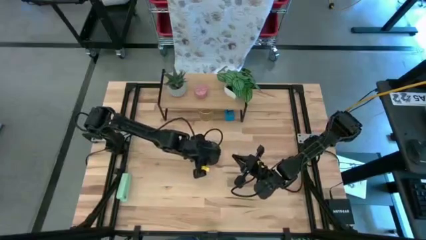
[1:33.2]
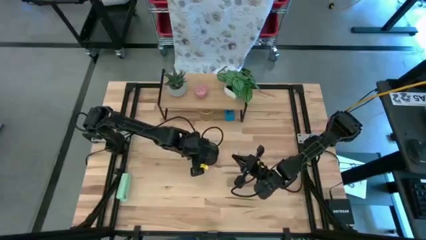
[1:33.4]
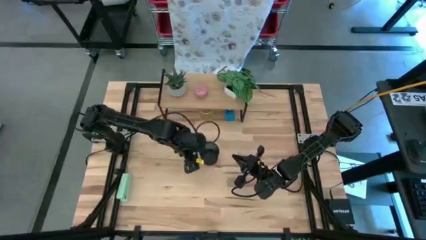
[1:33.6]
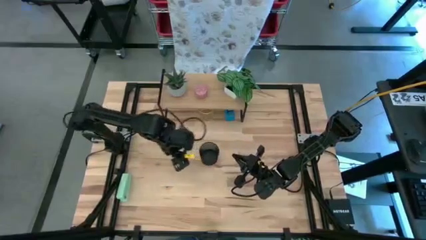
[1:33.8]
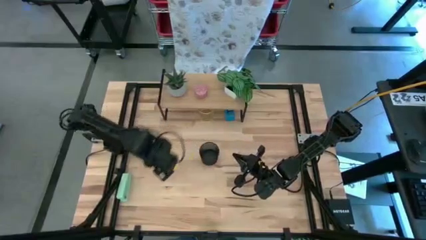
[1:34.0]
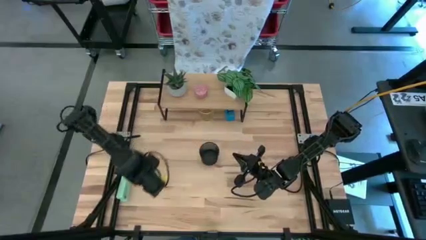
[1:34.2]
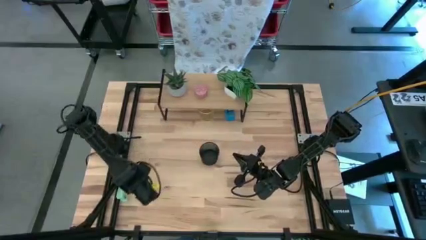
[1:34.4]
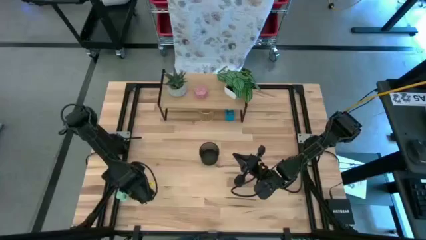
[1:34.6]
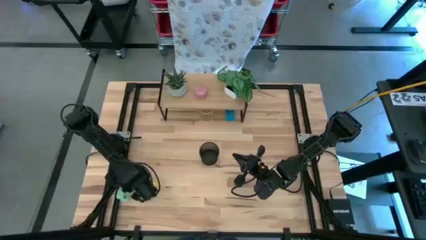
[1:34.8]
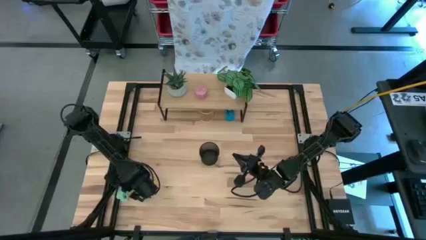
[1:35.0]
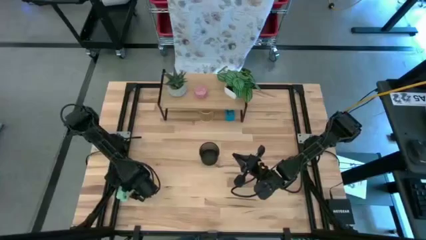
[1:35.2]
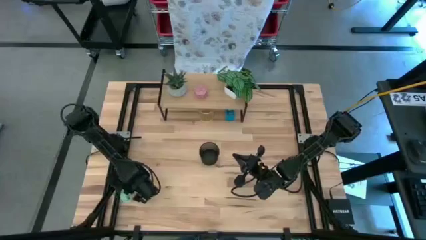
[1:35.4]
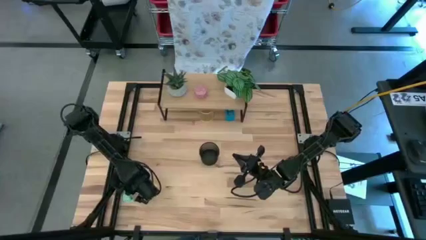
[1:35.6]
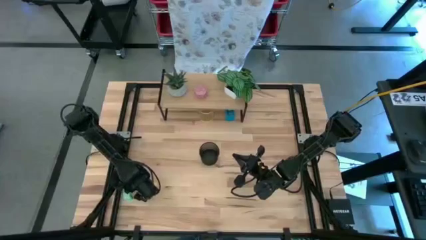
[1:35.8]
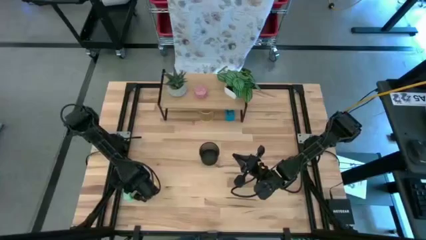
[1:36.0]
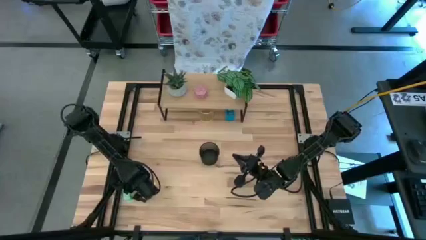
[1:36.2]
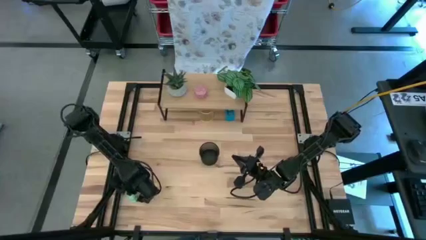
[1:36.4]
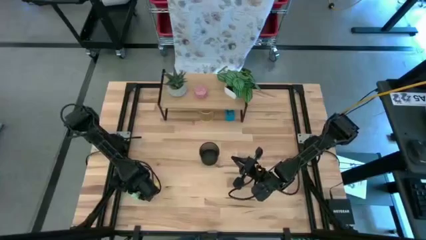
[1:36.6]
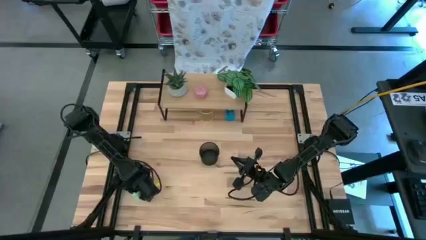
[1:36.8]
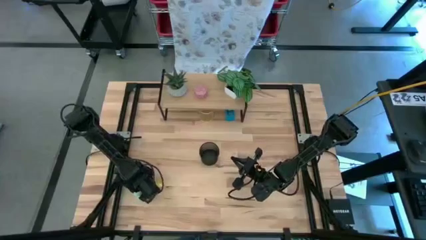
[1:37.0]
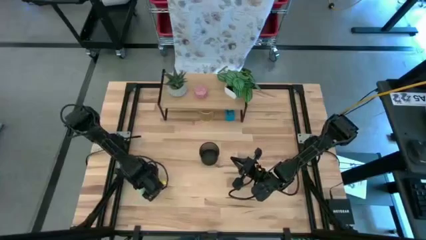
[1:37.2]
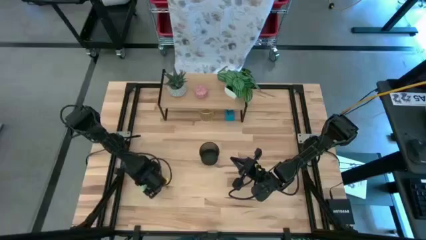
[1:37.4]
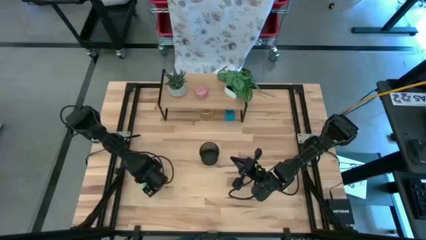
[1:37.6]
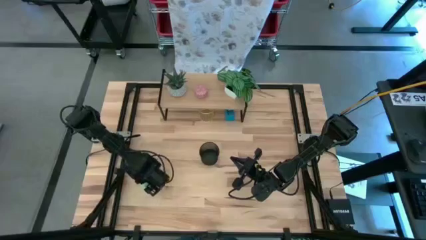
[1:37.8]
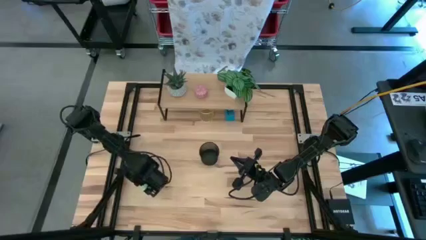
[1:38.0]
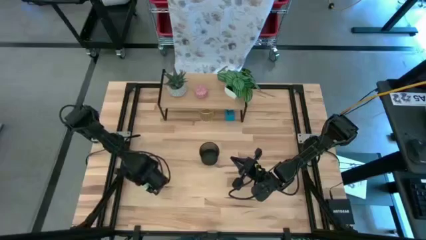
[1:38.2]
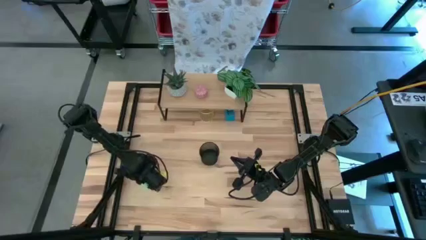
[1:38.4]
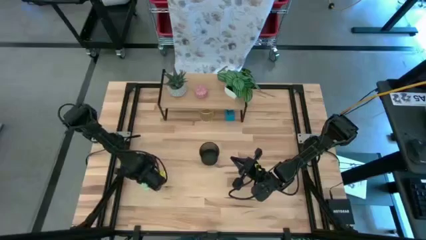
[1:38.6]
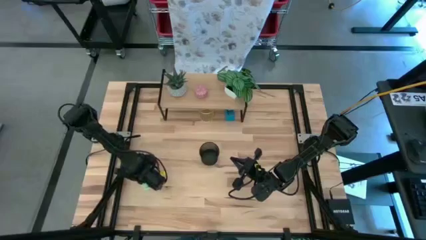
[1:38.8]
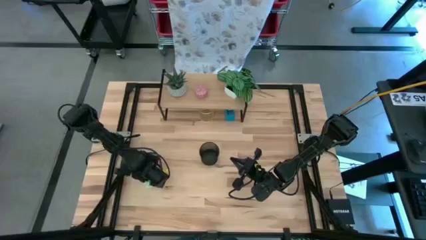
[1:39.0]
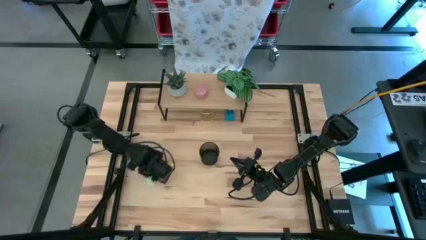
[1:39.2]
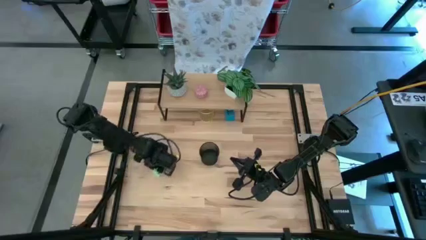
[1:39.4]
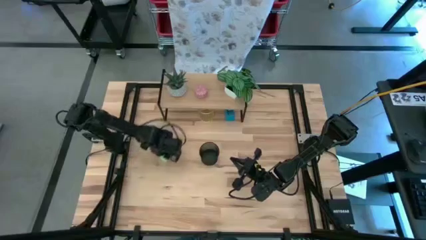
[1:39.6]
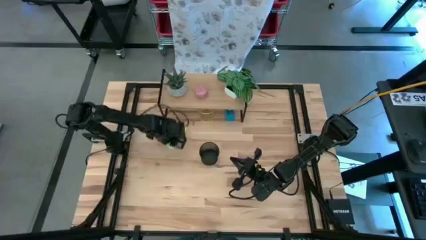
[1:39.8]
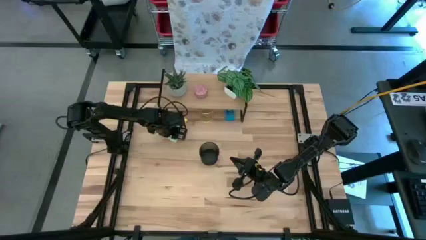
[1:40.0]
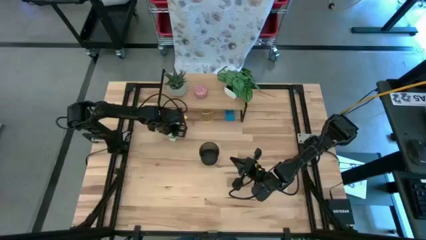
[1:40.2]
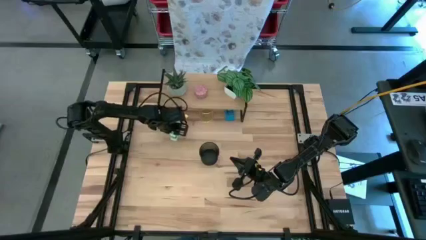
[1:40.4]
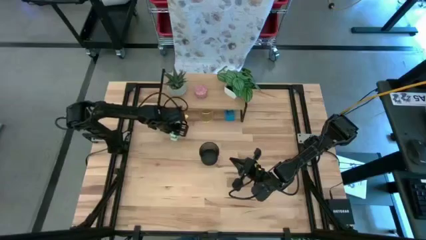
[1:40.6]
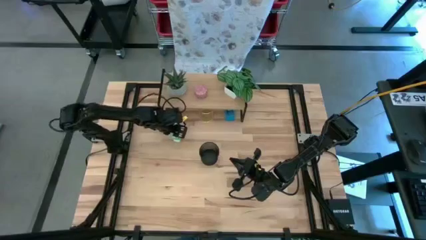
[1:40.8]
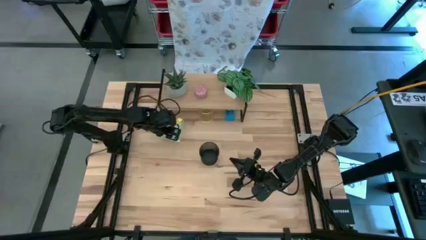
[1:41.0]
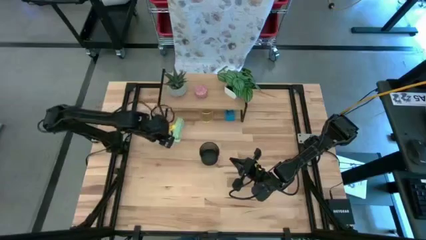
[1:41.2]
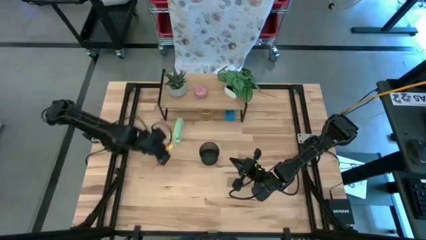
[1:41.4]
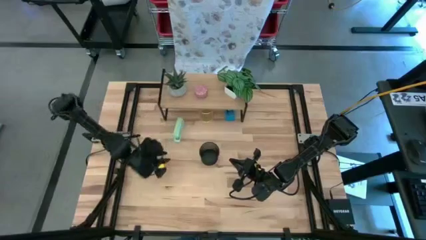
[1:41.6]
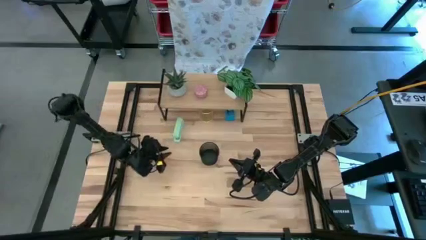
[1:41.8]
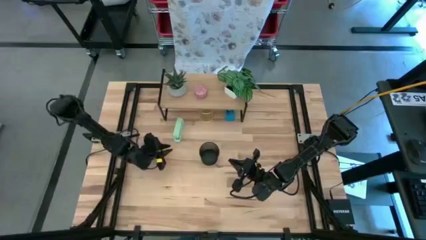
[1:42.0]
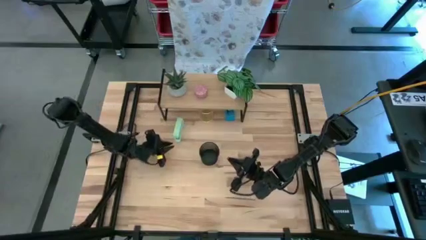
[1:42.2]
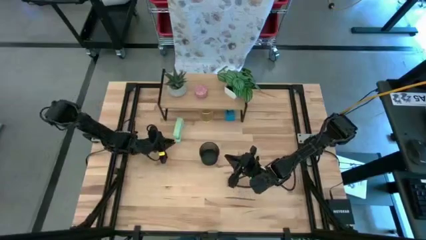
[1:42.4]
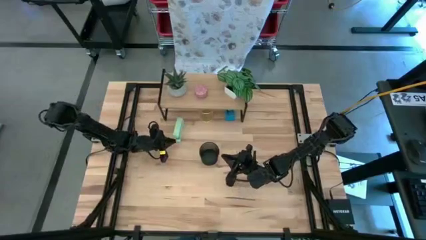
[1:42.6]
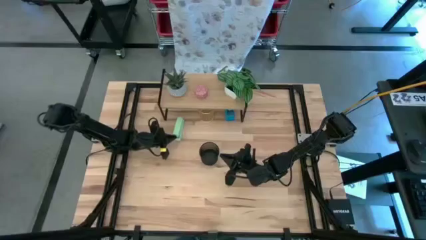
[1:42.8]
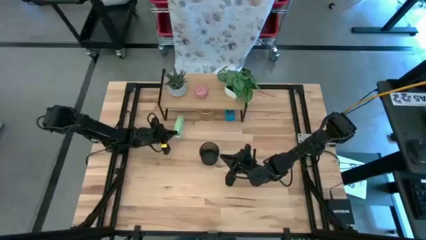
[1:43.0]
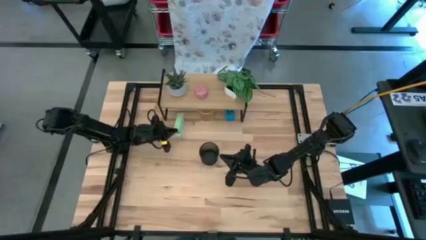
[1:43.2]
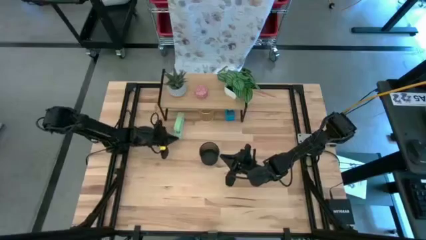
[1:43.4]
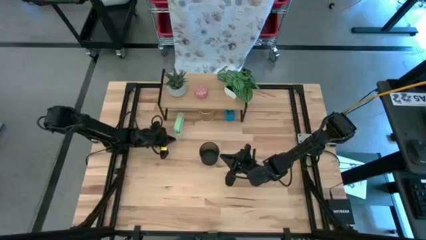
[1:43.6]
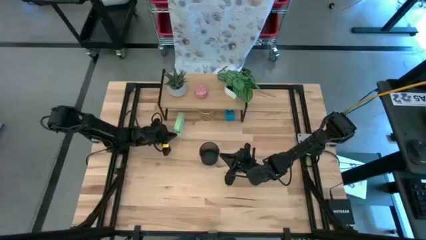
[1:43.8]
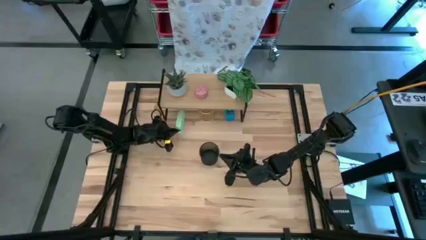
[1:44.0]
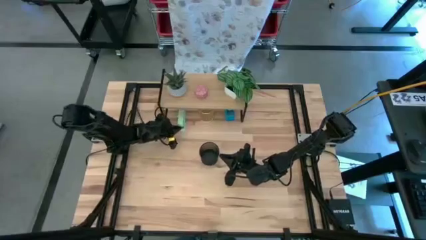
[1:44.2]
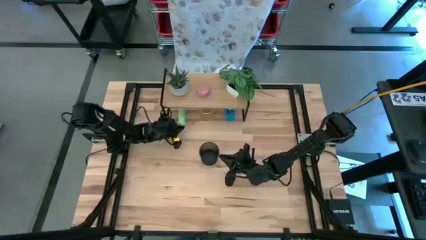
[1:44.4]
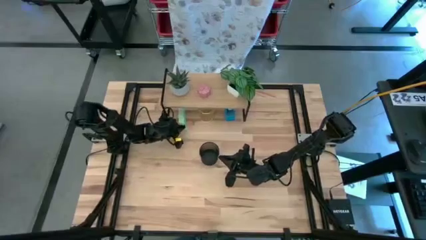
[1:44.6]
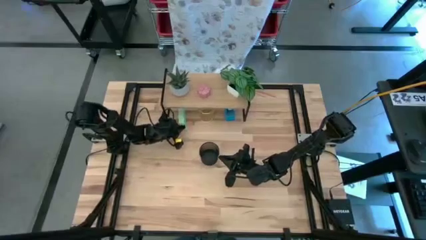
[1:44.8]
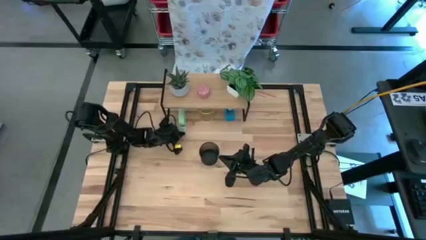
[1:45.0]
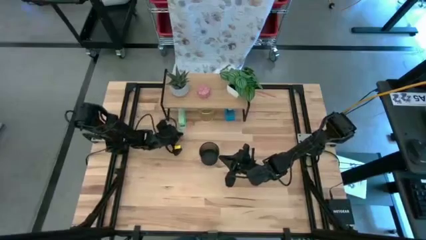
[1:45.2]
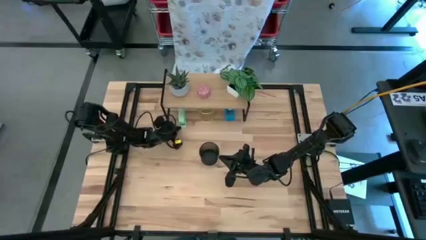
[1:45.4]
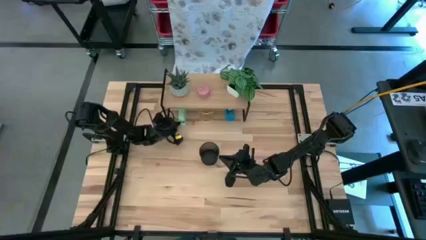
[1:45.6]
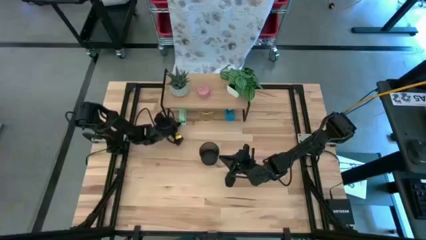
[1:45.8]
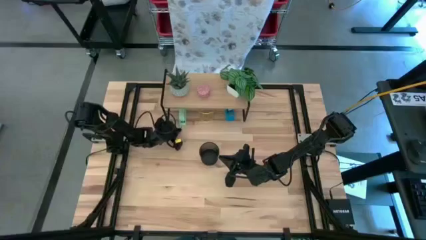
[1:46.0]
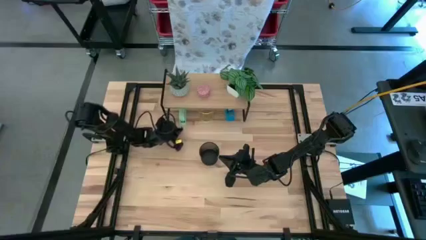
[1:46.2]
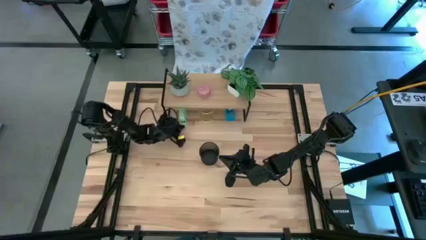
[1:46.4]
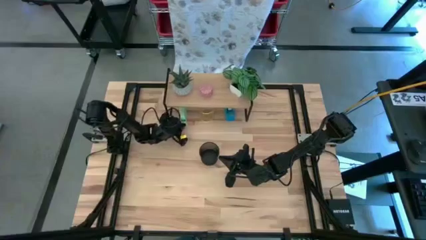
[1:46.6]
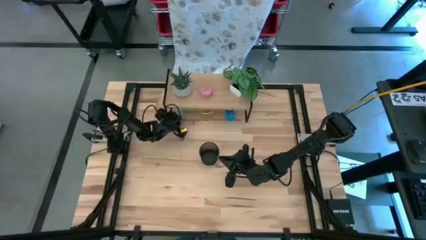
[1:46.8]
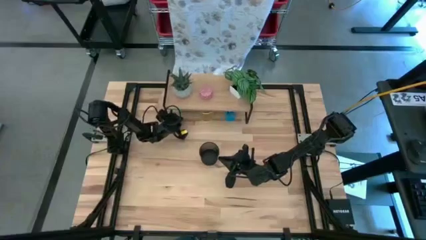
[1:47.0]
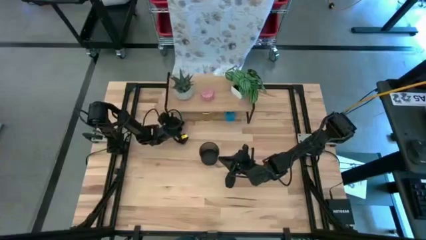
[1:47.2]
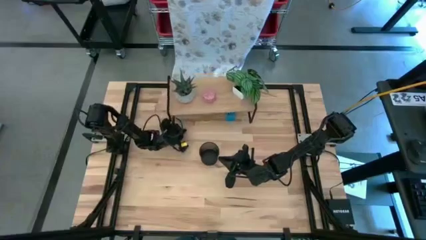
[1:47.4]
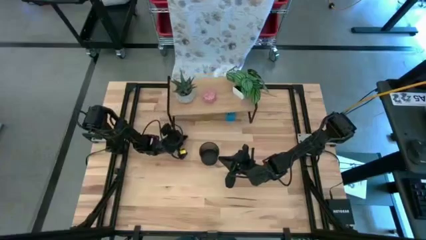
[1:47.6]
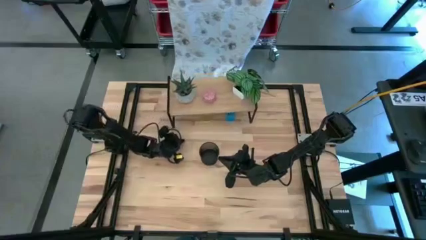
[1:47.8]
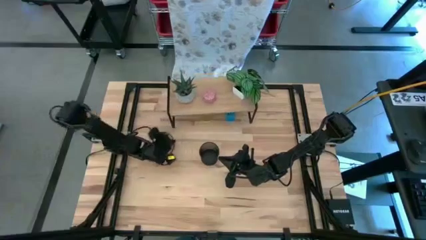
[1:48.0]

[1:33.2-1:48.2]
Task: Stock shelves
Put the light blue stapler under the shelf
